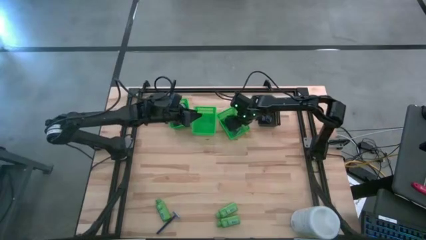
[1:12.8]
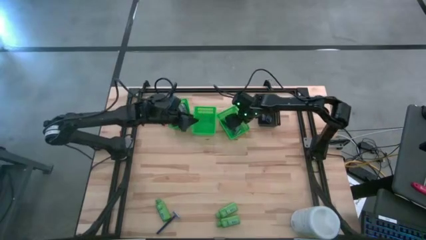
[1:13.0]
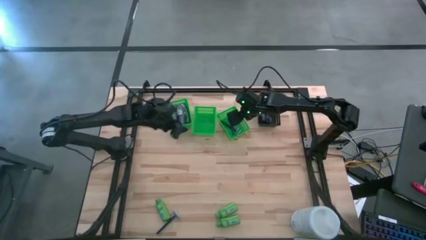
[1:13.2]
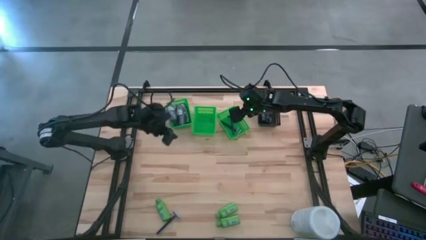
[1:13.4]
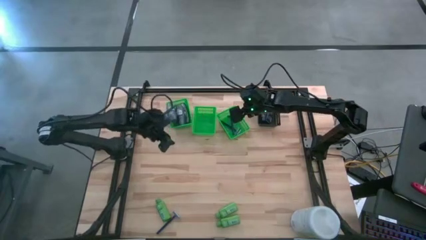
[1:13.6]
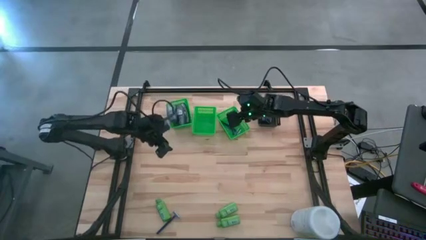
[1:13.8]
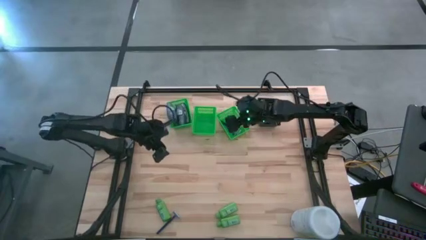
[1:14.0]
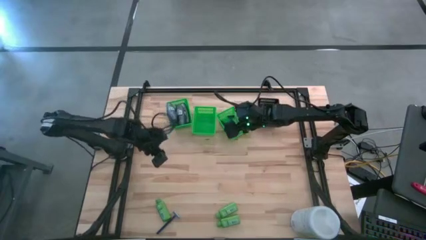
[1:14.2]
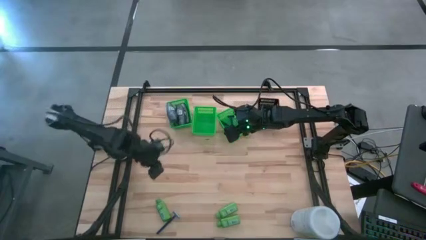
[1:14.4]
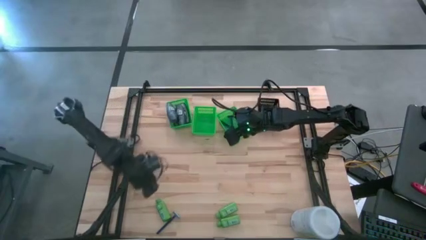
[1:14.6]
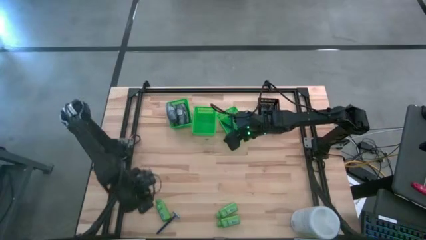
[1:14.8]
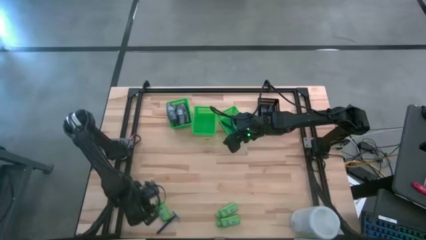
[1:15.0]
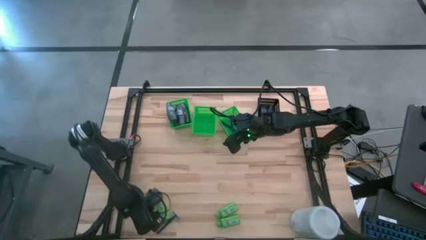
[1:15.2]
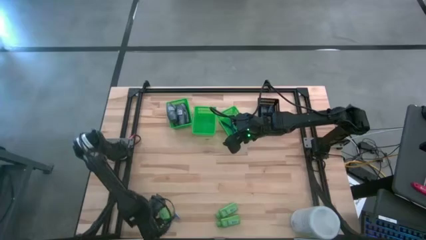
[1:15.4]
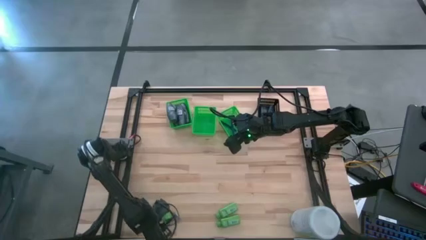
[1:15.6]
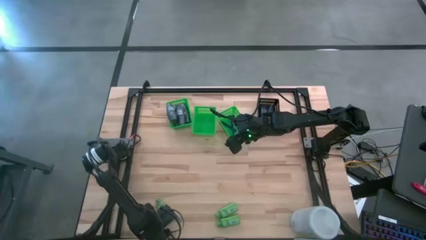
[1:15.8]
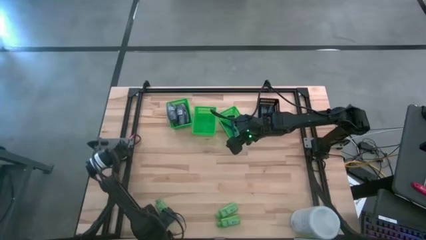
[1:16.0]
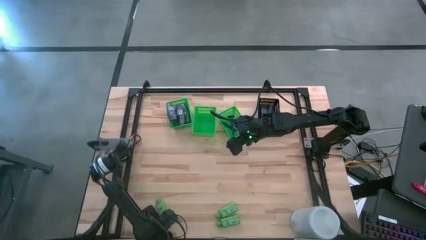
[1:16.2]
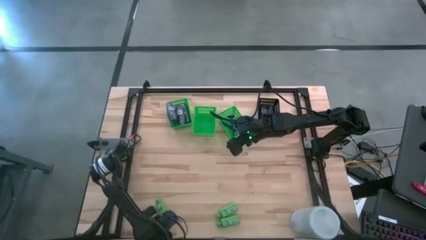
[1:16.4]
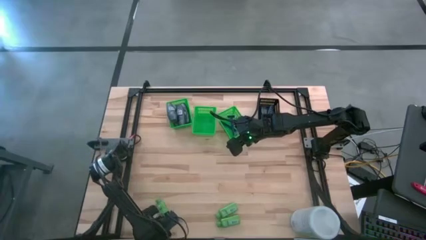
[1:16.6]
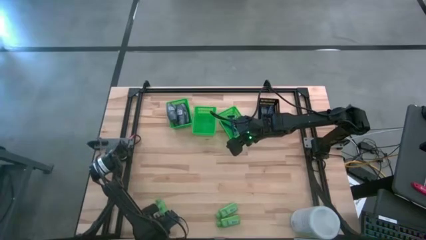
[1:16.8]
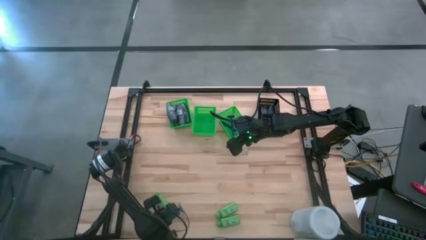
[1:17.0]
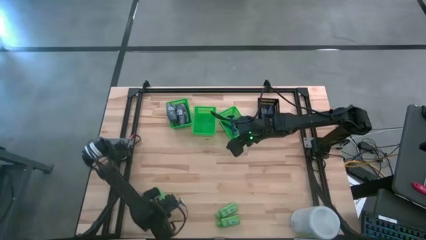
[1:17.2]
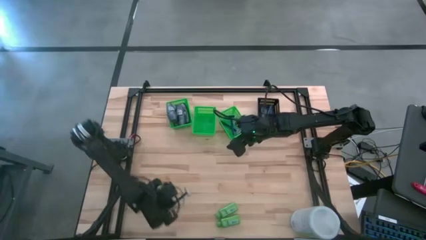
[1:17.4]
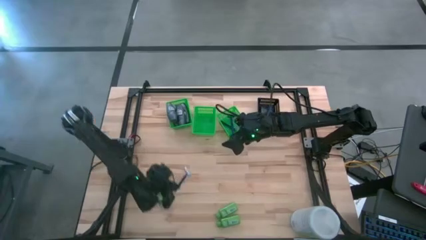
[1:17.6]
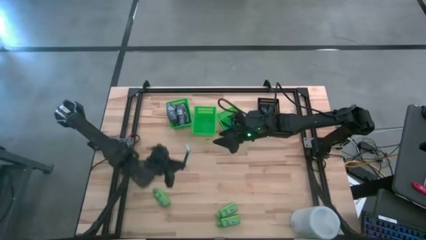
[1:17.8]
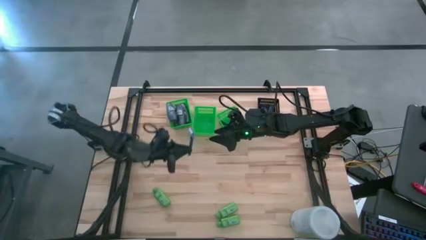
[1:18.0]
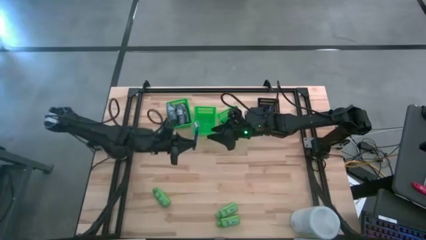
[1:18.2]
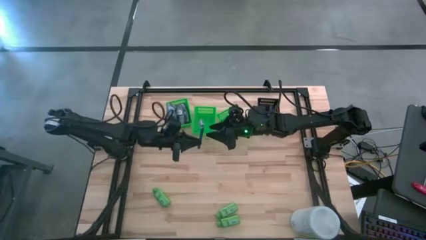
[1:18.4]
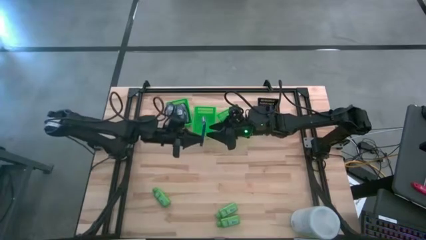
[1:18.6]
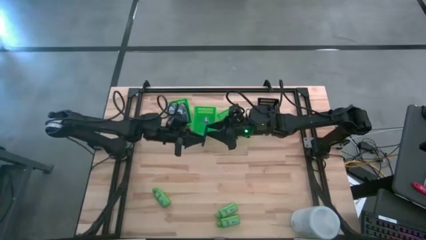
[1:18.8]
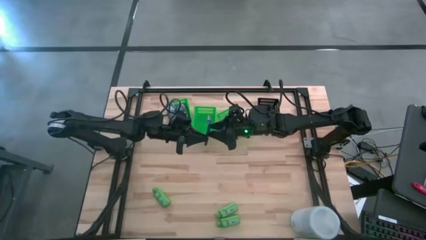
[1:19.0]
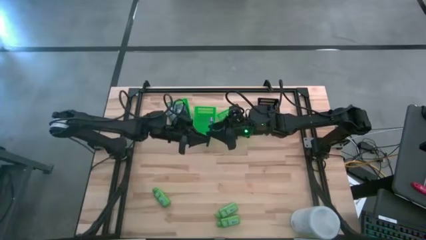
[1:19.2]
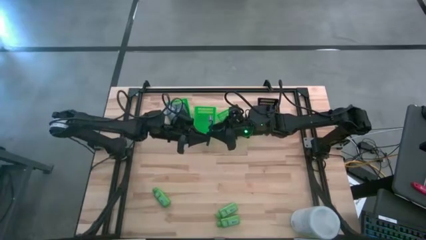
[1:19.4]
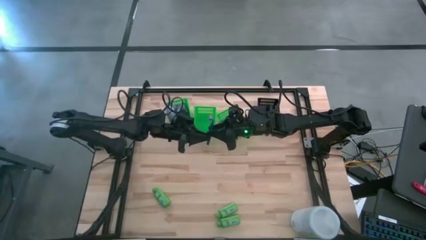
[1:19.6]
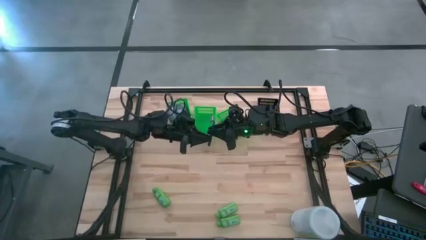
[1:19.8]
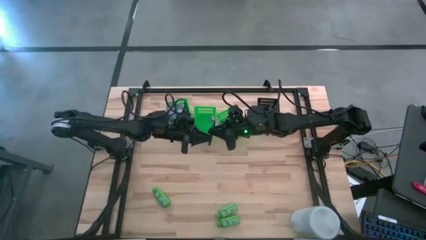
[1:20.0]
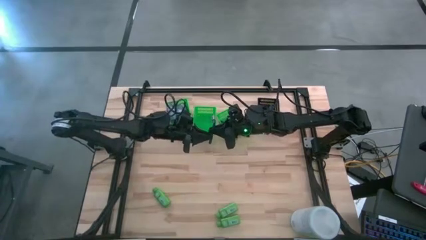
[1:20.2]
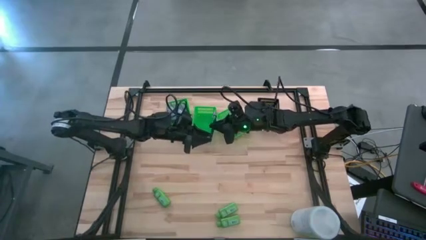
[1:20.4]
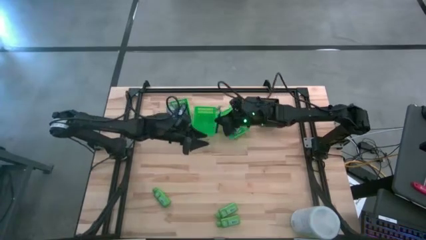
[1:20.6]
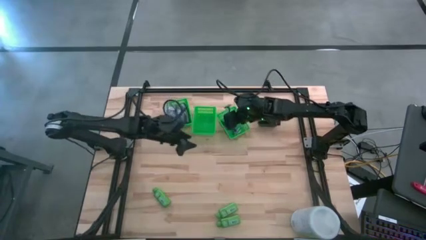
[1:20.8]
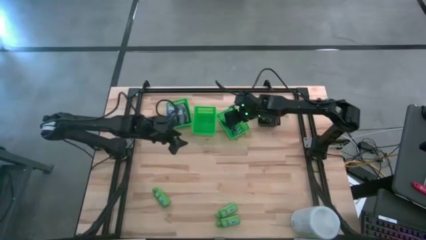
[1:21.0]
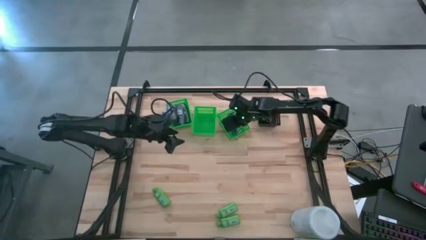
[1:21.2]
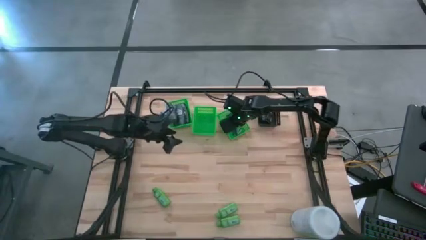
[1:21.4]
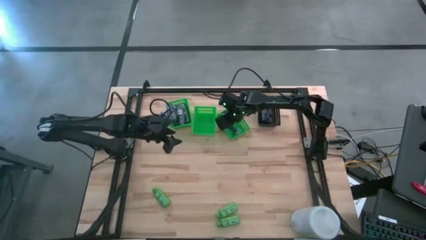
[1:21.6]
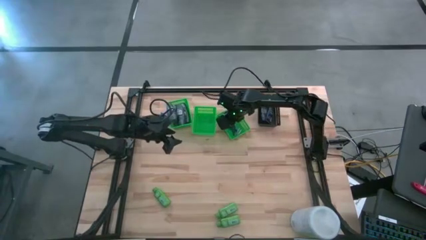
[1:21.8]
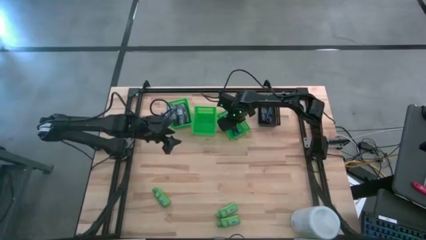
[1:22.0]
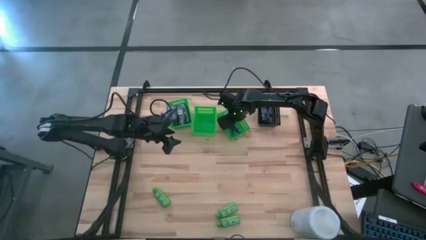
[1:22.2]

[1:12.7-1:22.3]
Task: Pick & Place Travel size toiletries
Put the razor into the right green bin

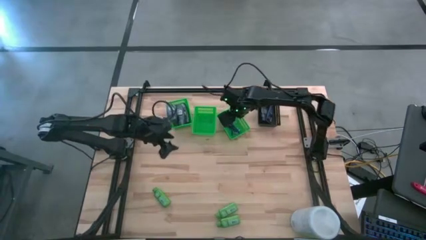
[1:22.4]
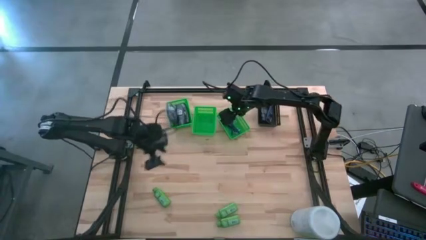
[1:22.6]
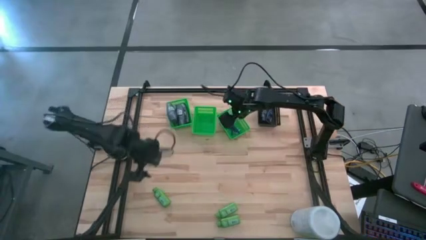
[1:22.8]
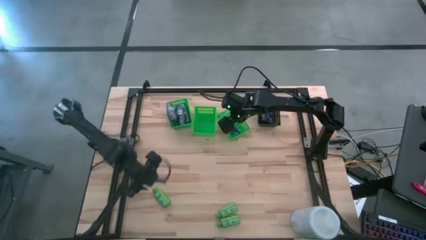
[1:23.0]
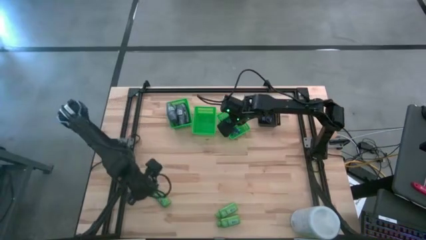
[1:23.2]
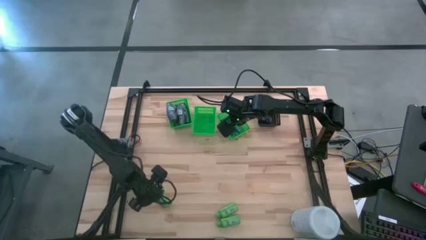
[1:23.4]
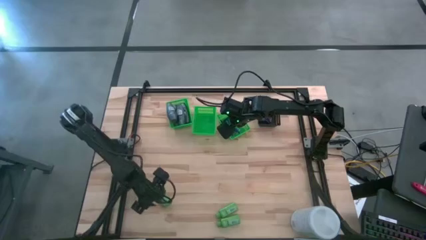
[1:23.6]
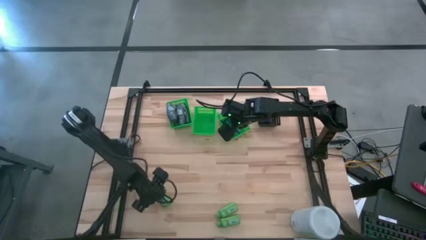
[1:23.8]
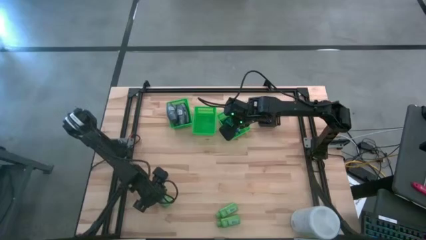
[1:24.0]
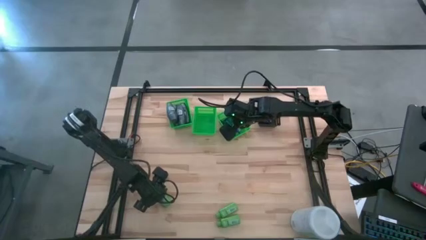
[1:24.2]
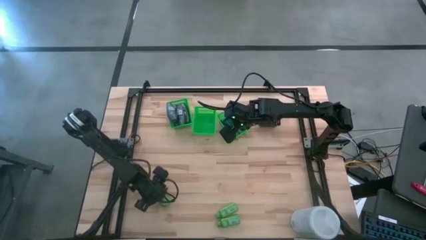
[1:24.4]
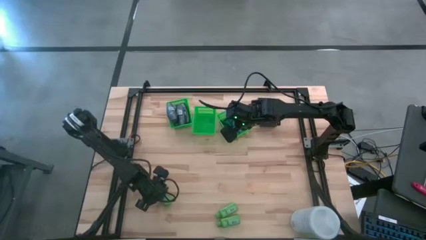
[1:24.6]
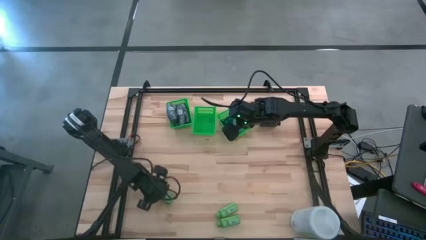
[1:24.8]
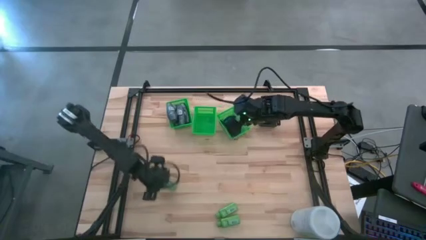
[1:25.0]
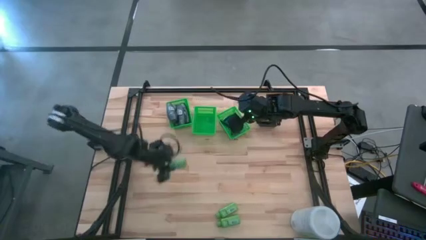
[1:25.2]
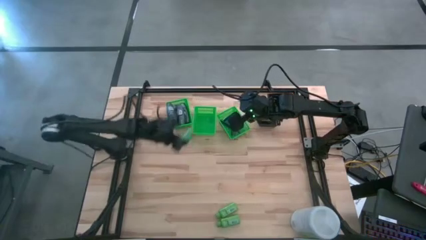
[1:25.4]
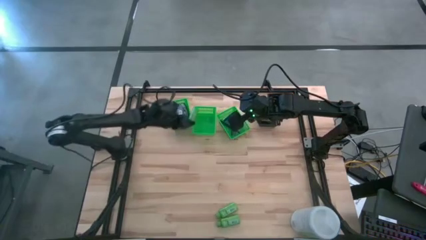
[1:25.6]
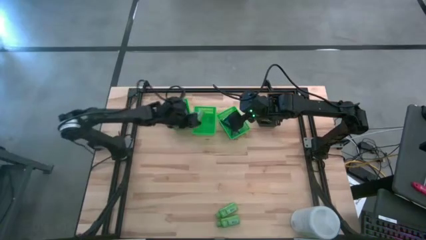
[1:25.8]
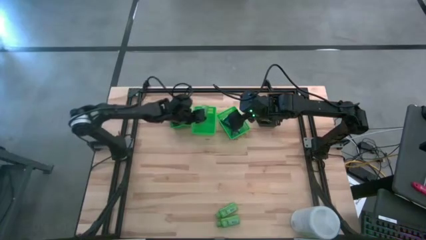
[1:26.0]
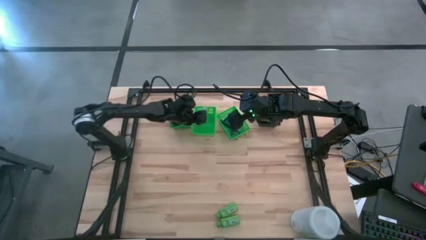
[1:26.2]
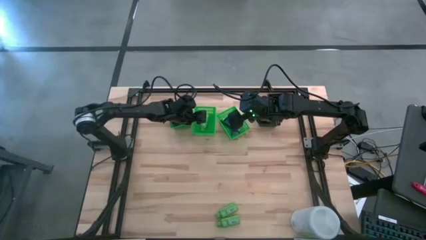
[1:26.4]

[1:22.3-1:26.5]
Put the shampoo into the middle green bin

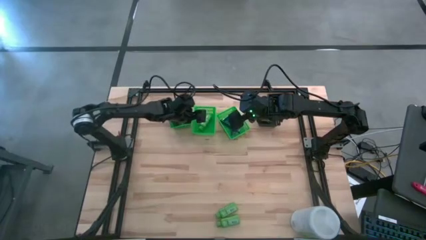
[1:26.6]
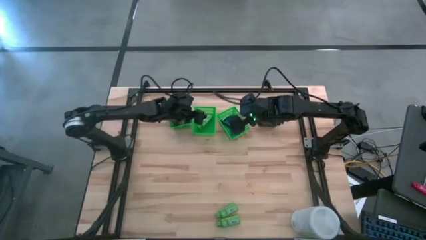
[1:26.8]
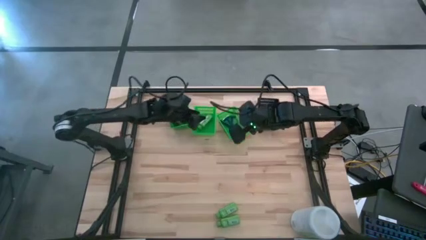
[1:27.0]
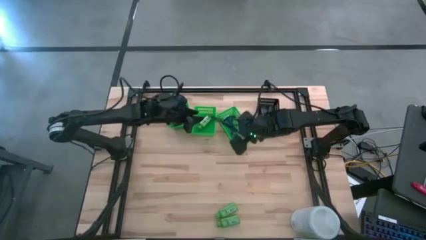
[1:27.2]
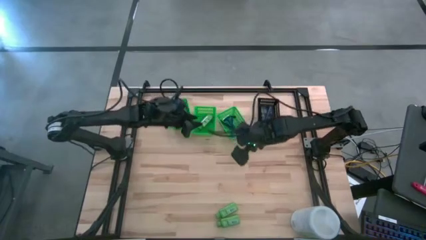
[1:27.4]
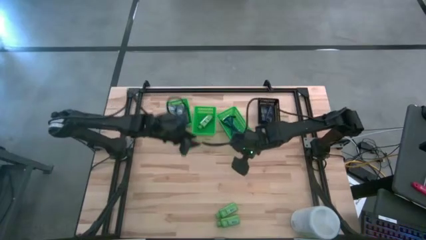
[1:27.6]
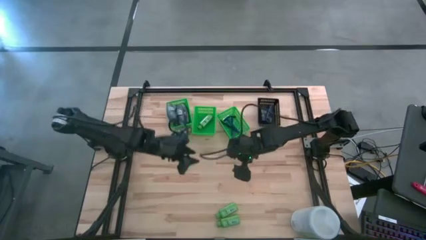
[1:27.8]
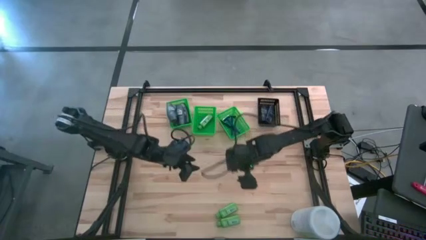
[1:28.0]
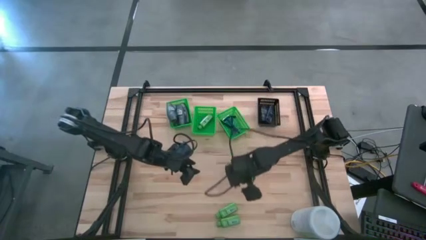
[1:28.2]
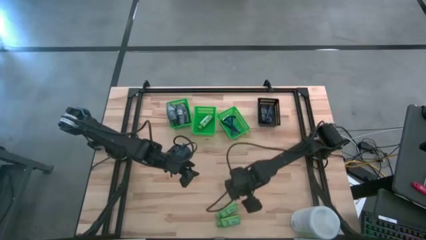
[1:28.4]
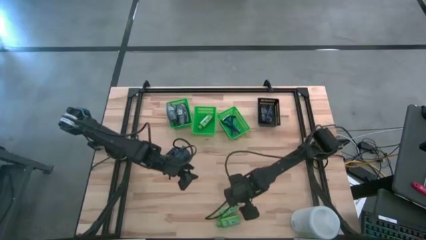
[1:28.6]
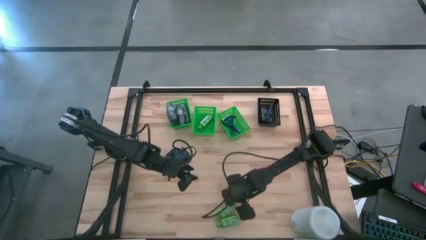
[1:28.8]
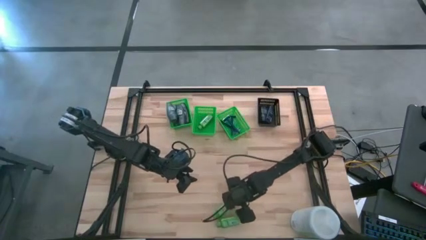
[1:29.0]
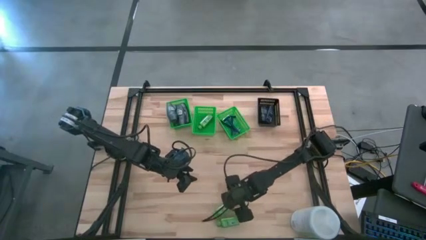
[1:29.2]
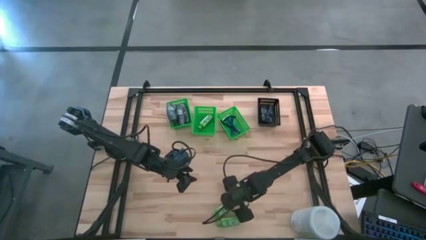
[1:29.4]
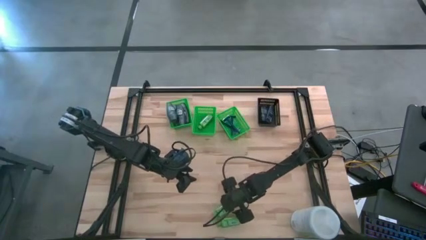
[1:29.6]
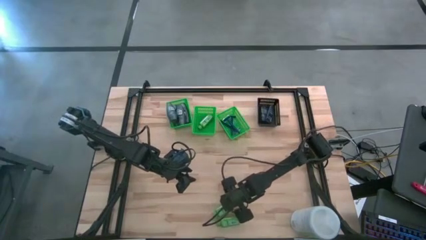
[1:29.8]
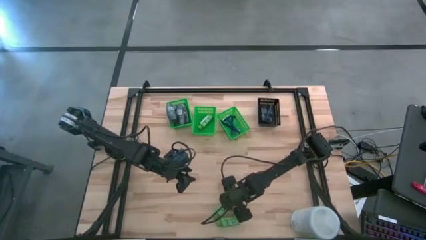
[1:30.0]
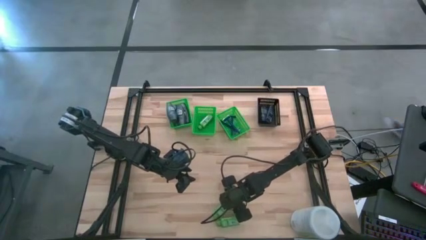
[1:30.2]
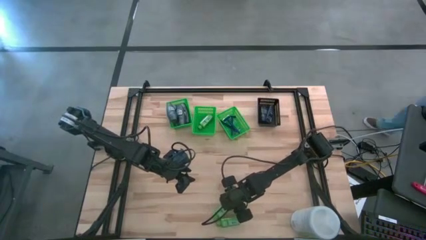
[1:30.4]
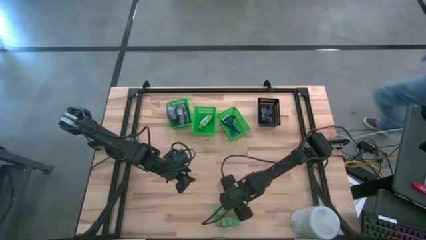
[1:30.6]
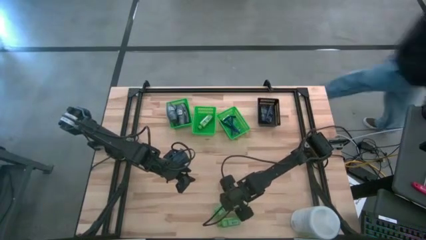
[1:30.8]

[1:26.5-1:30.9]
Put the shampoo into the middle green bin
